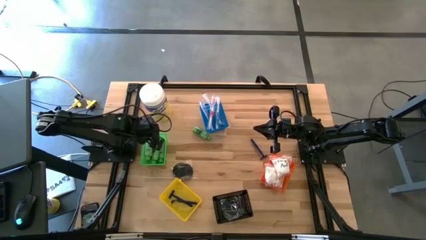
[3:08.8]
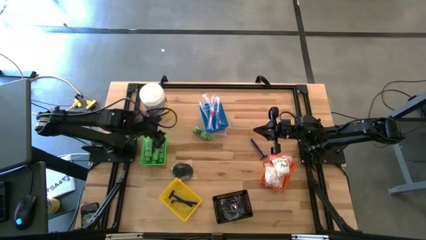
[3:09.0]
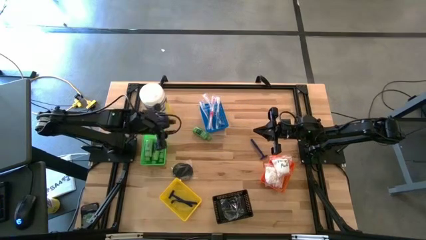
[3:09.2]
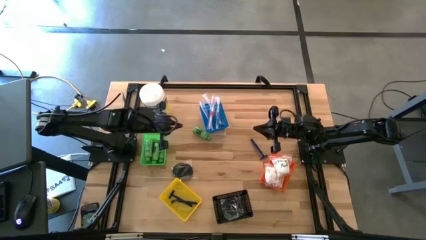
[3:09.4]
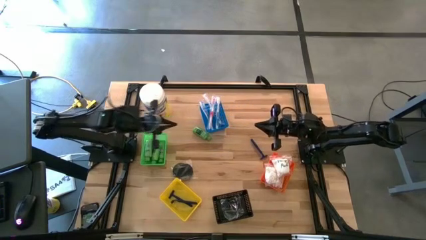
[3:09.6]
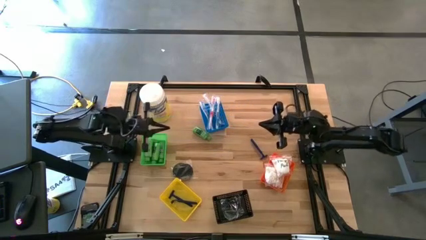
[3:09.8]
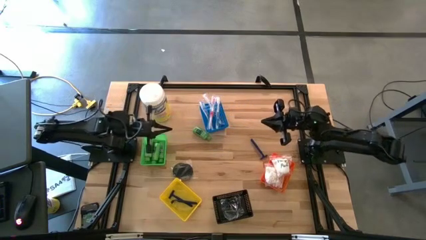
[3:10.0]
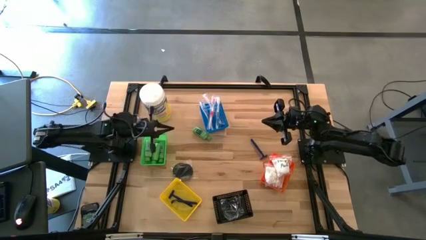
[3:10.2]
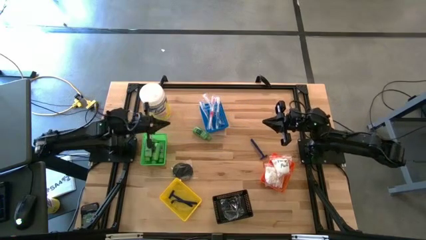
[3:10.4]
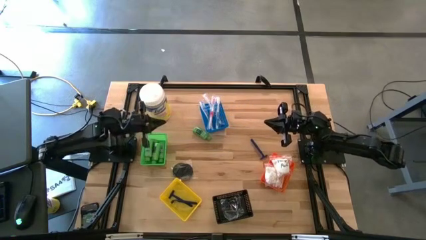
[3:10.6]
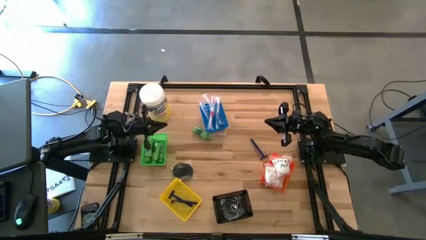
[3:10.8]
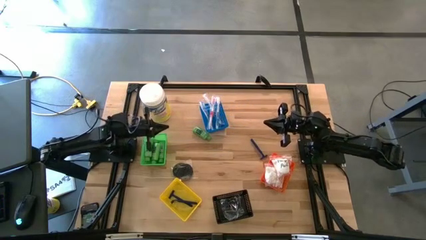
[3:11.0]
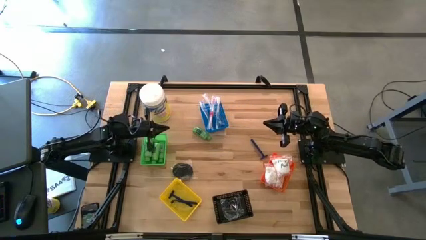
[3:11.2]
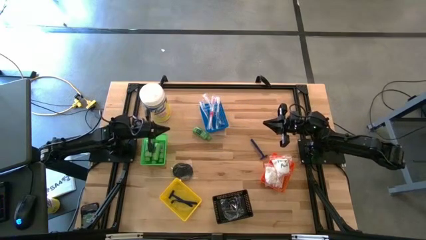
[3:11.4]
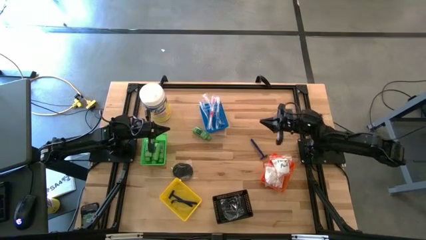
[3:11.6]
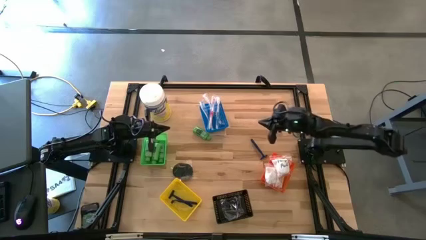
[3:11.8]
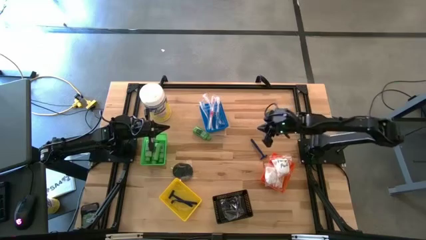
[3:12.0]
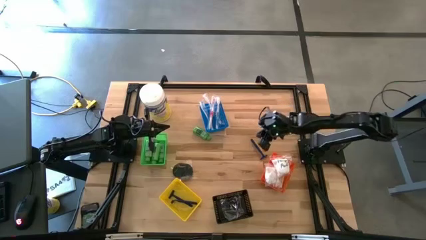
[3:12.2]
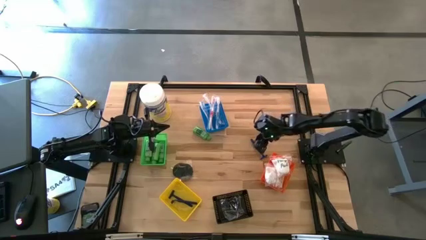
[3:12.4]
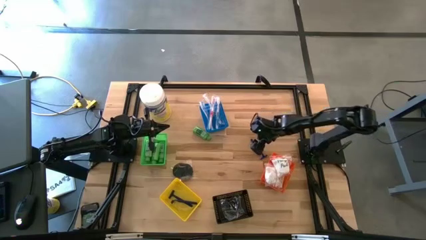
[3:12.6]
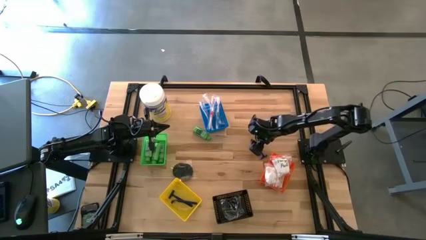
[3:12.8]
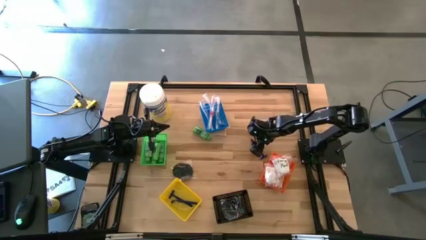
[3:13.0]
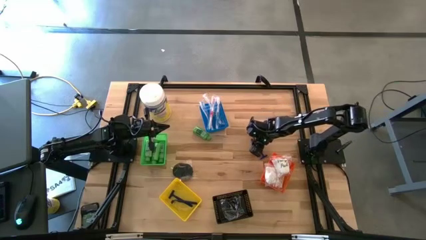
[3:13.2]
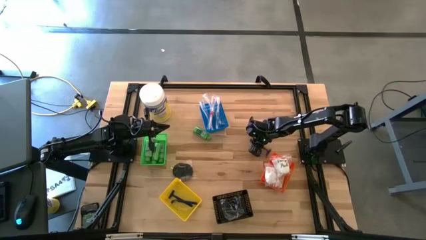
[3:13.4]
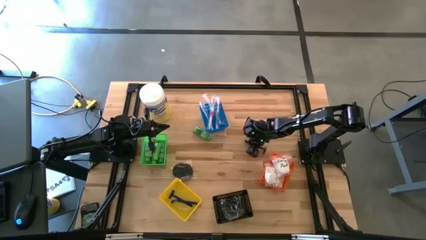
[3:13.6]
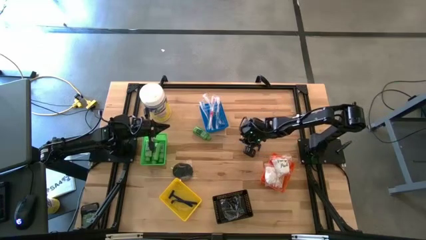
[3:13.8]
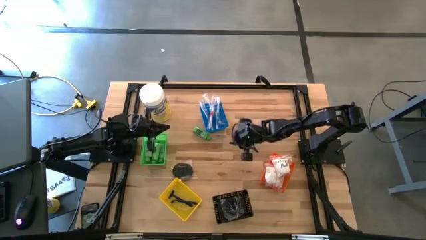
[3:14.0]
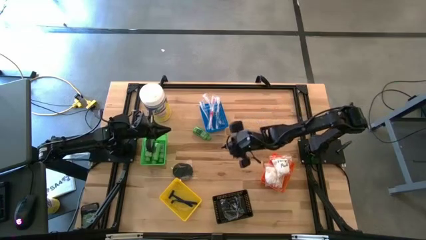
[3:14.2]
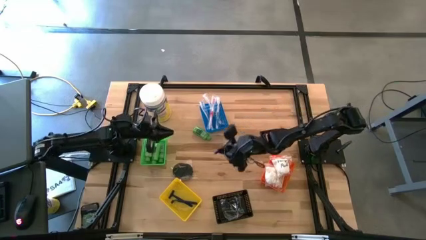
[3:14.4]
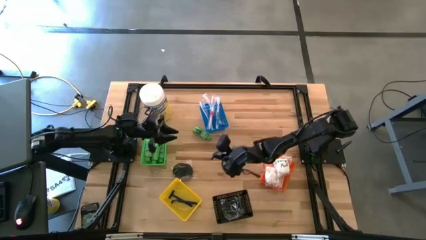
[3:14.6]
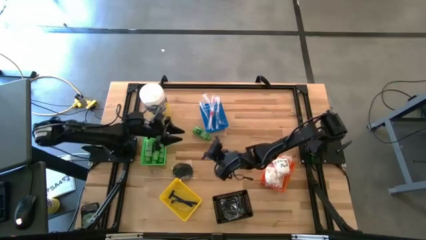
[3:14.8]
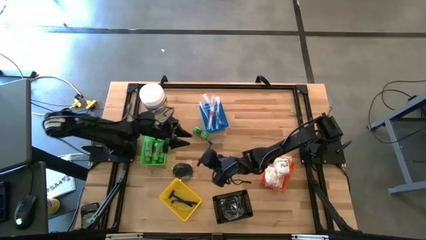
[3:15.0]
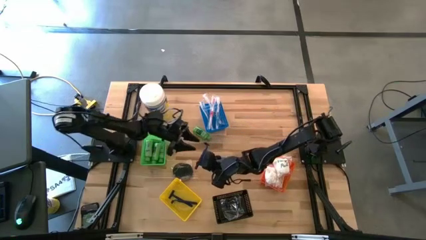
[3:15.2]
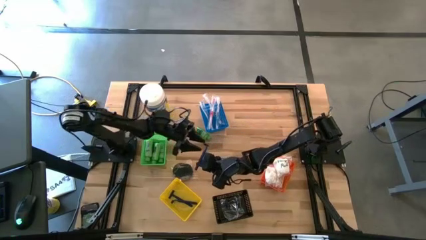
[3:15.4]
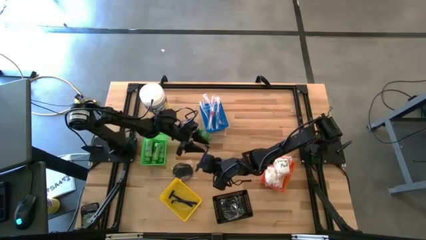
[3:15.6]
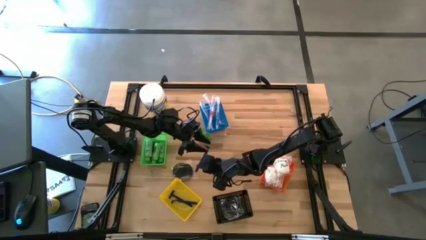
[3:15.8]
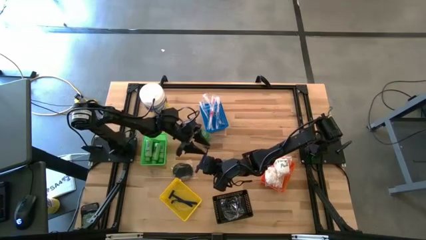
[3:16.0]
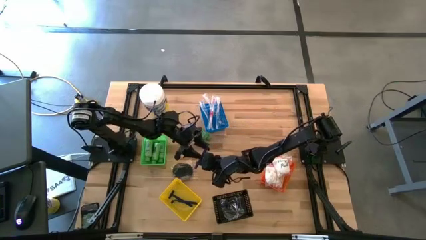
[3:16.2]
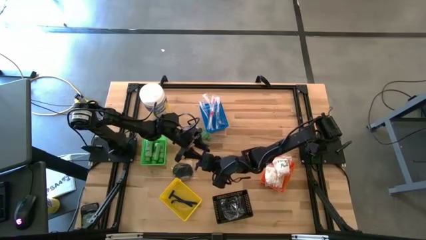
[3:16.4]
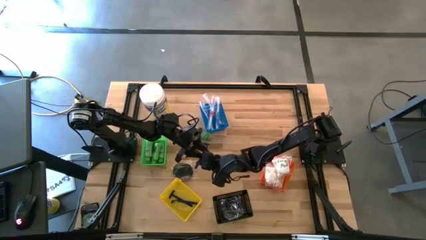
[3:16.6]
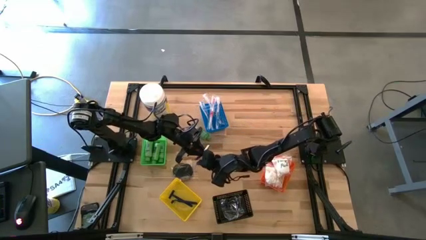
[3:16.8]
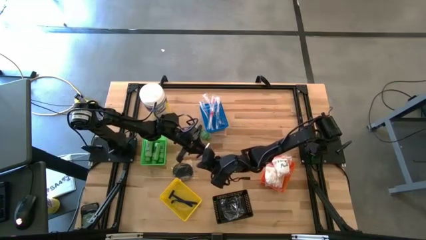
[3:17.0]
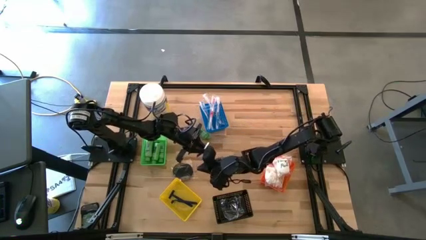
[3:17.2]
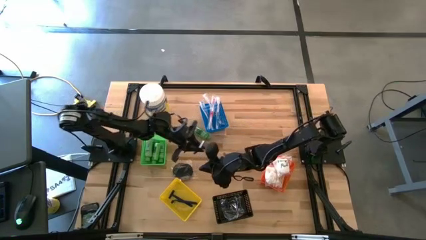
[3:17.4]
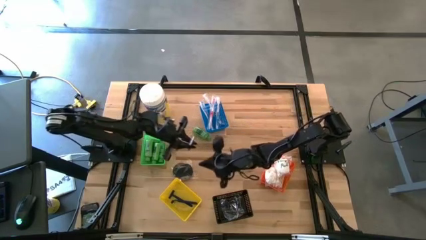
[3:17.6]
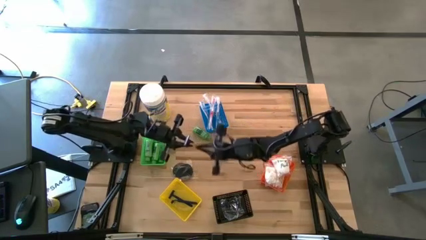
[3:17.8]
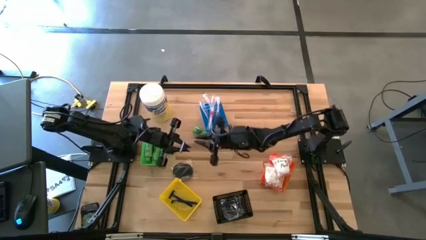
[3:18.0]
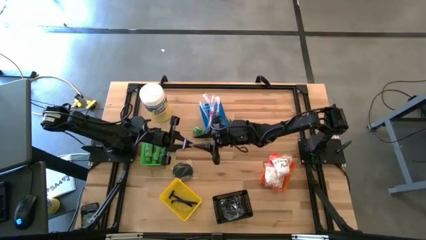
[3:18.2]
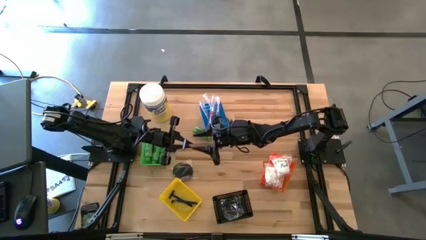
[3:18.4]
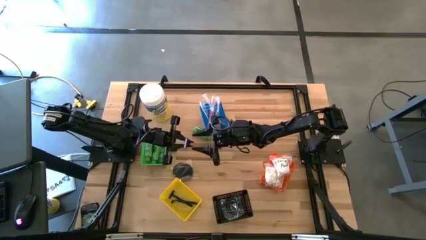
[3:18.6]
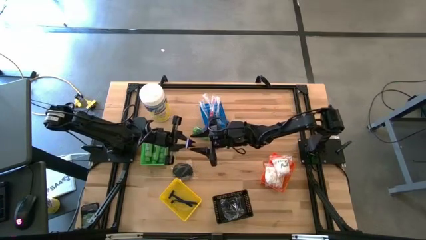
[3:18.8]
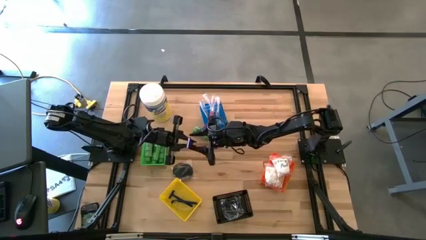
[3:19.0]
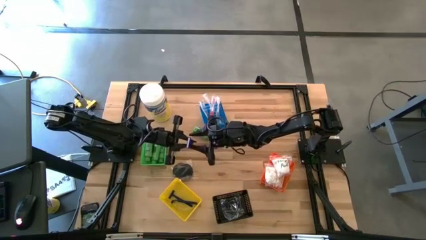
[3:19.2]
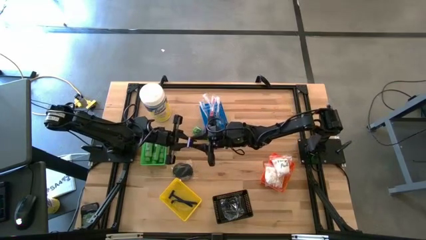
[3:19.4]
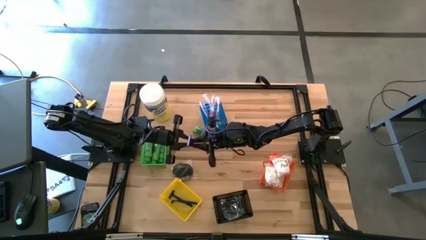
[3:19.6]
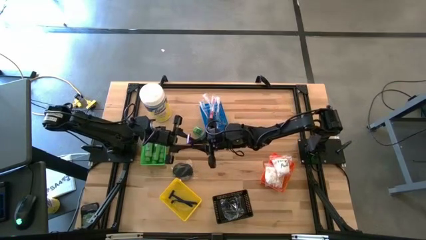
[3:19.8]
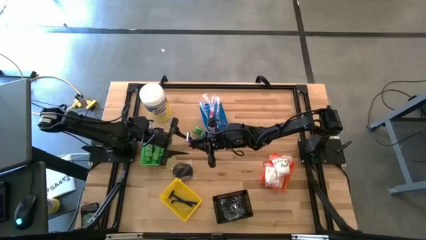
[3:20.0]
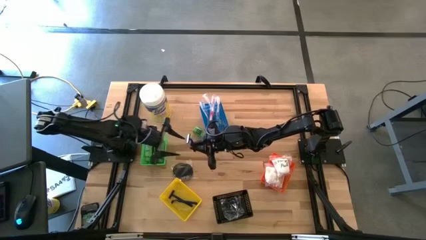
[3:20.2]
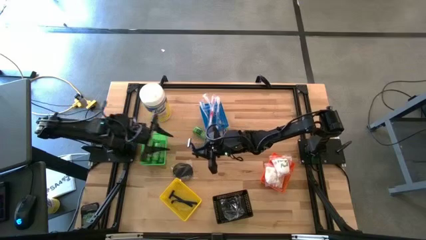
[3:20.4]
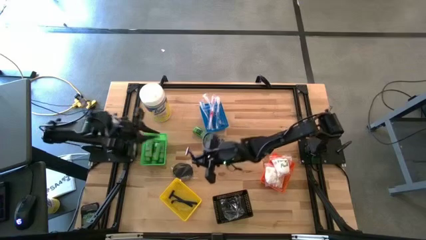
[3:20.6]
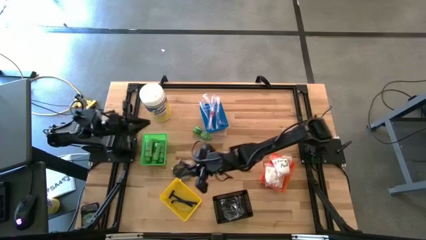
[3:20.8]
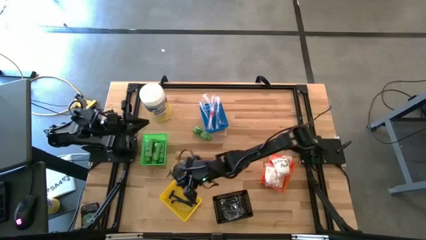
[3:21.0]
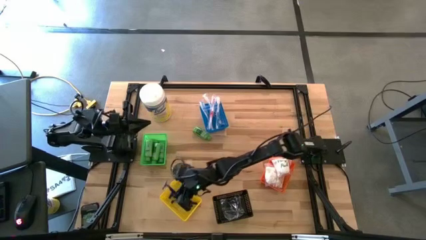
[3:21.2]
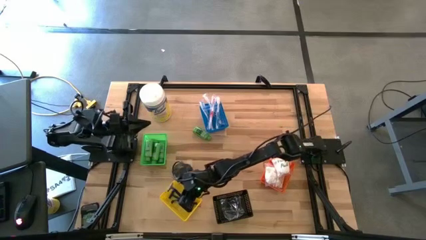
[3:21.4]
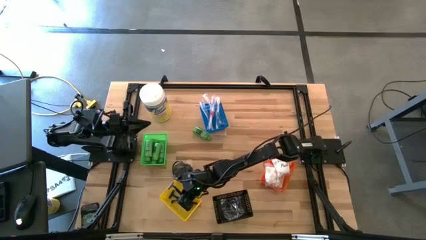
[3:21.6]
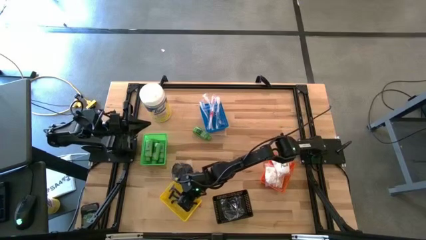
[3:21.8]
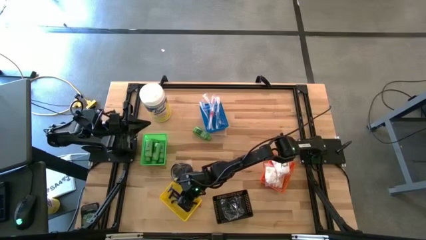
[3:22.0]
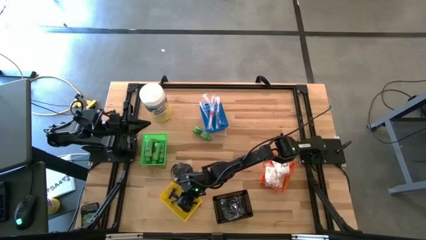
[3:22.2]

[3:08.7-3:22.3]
Task: Pick & Place Travel size toiletries
Put the blue razor into the yellow bin

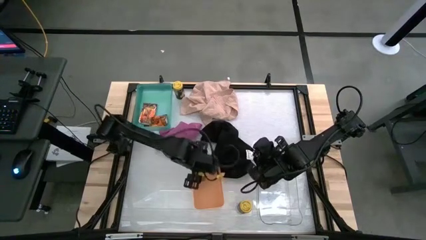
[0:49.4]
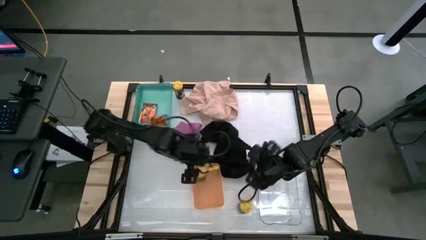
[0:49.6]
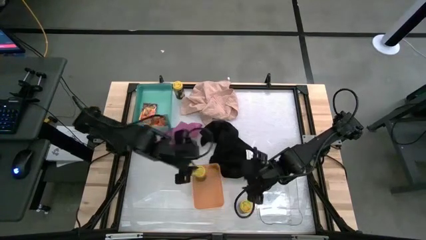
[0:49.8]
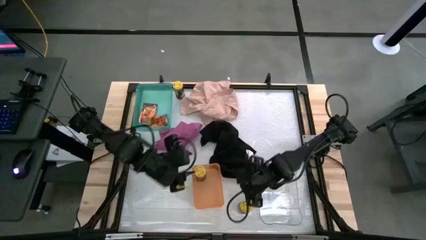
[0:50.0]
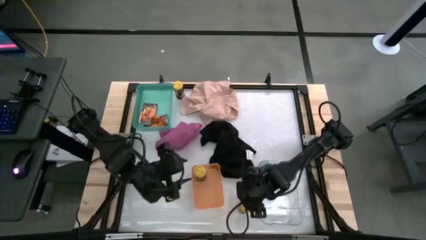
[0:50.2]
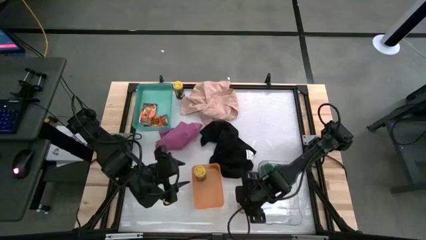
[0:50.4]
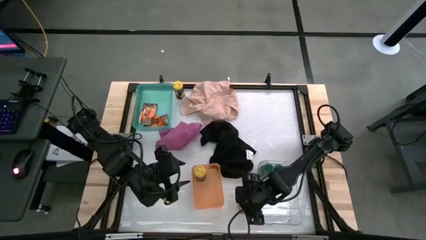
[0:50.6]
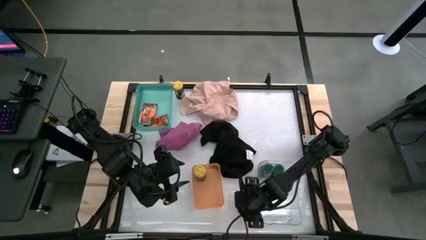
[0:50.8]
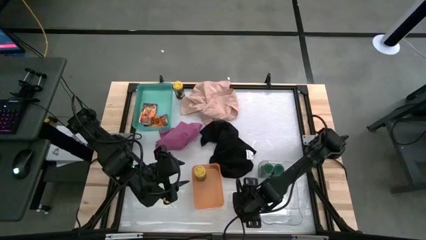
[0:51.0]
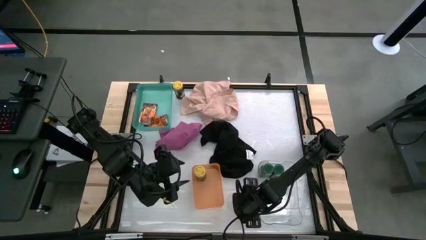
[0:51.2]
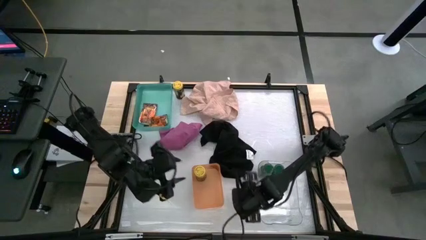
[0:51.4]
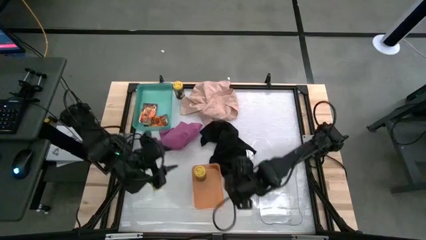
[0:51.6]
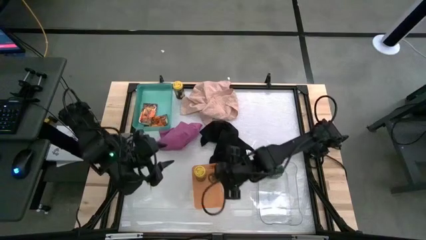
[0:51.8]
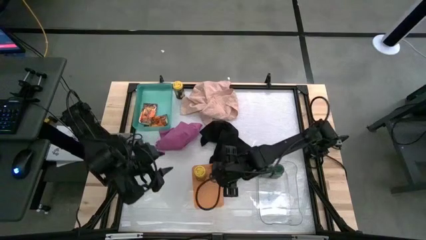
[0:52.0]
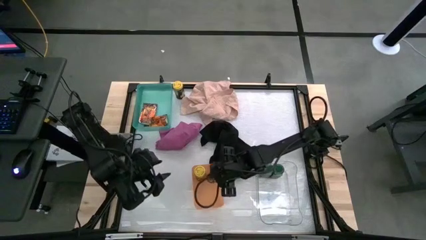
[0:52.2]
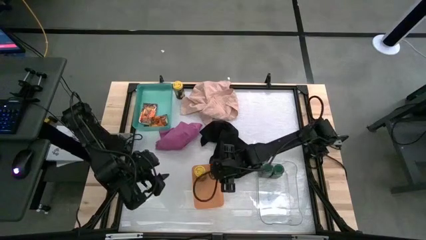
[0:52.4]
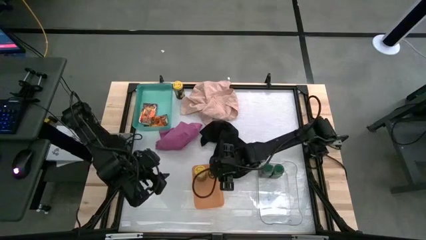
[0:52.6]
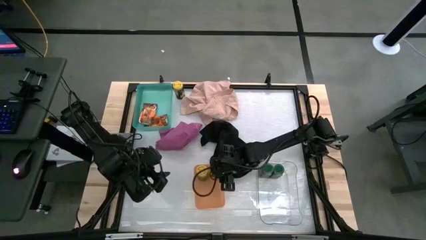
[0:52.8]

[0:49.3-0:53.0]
Task: Sort spices by type
Put the bottom yellow seasoning bottle into the orange bin
